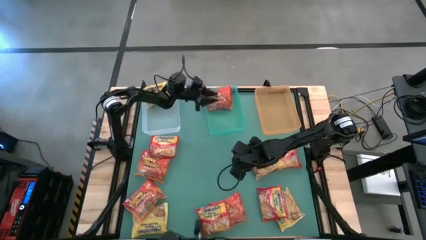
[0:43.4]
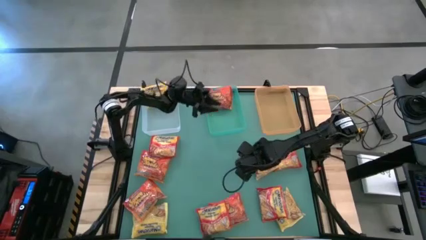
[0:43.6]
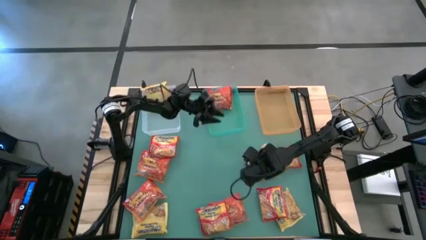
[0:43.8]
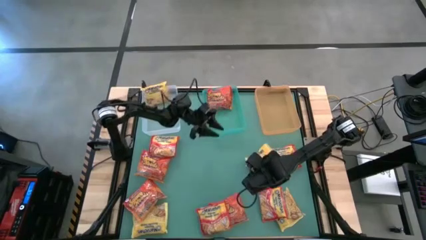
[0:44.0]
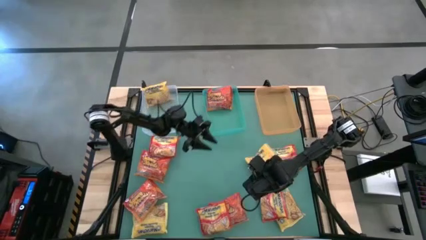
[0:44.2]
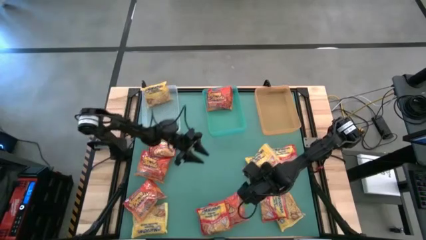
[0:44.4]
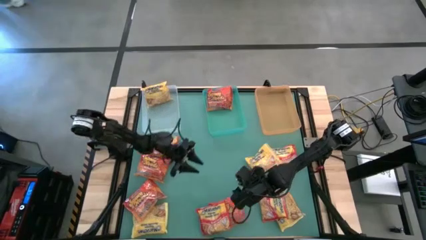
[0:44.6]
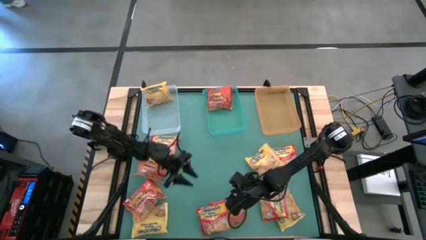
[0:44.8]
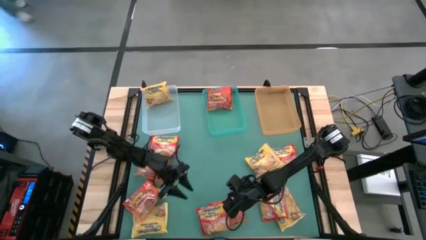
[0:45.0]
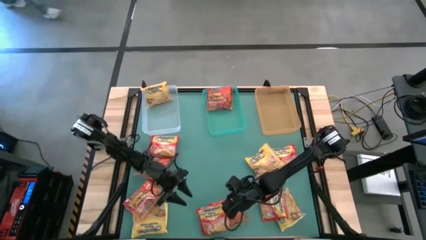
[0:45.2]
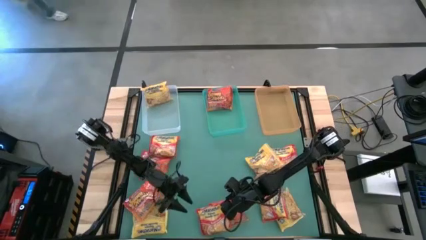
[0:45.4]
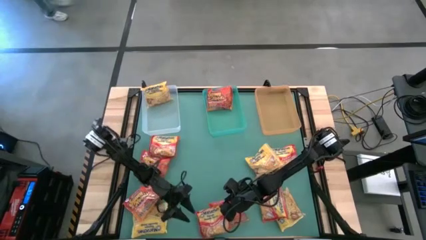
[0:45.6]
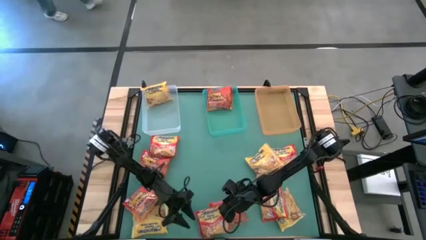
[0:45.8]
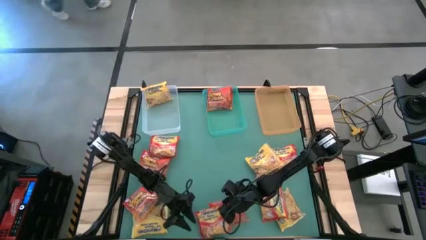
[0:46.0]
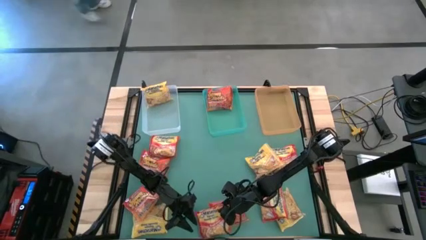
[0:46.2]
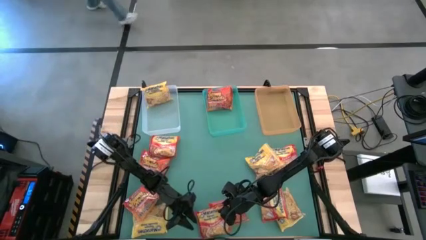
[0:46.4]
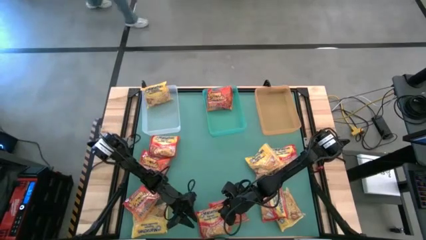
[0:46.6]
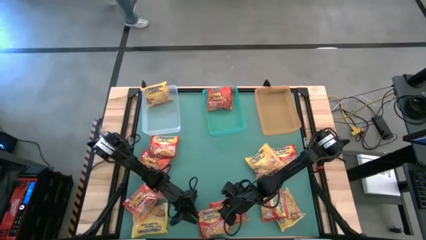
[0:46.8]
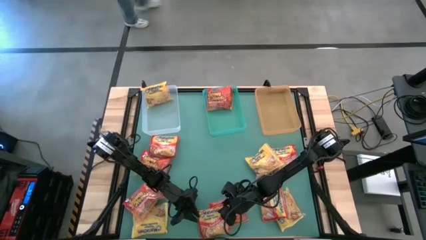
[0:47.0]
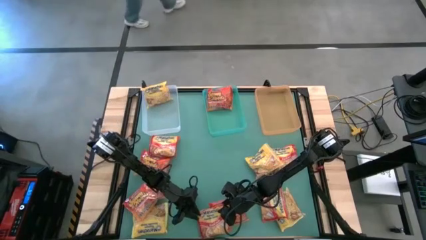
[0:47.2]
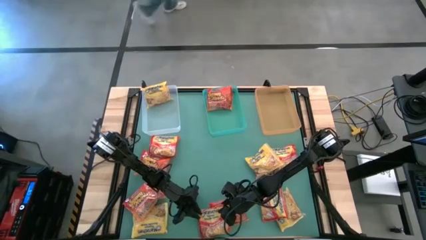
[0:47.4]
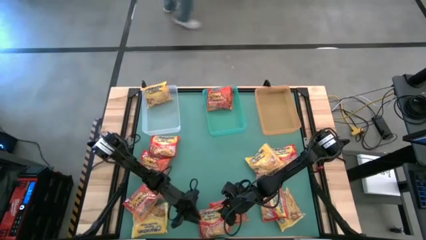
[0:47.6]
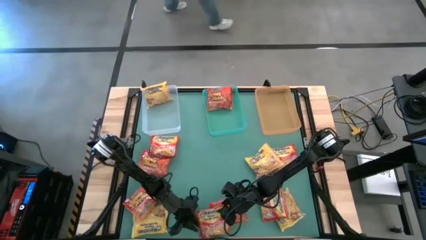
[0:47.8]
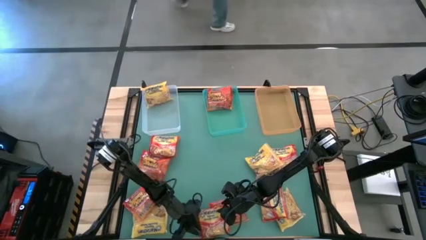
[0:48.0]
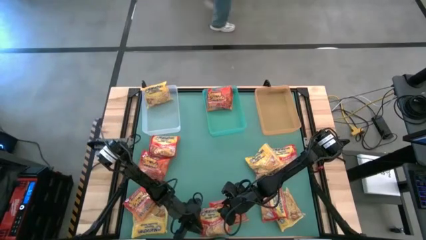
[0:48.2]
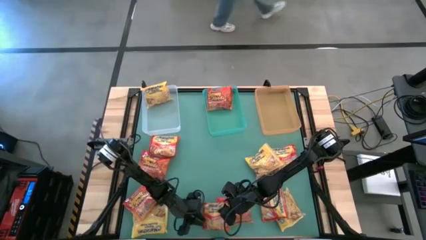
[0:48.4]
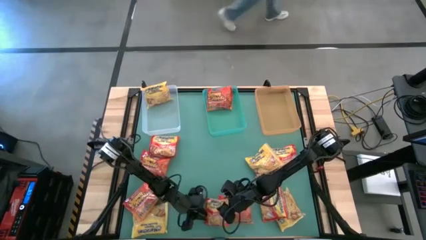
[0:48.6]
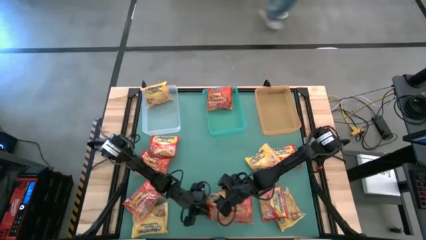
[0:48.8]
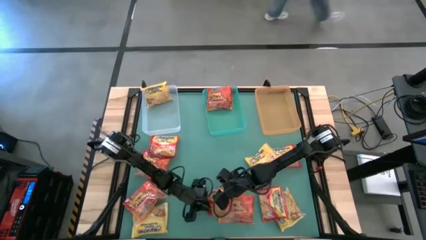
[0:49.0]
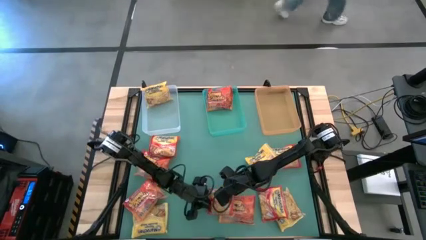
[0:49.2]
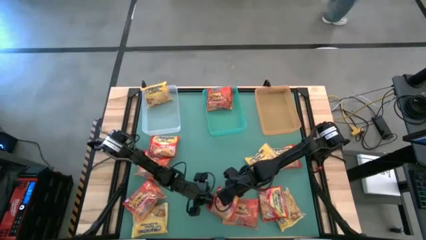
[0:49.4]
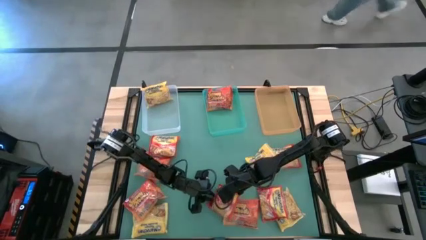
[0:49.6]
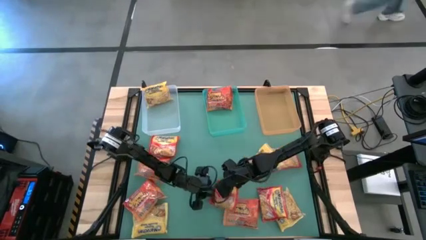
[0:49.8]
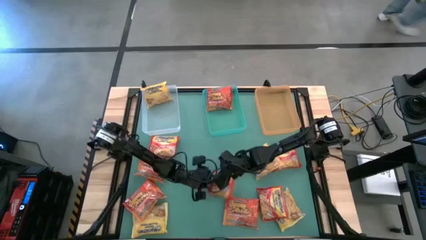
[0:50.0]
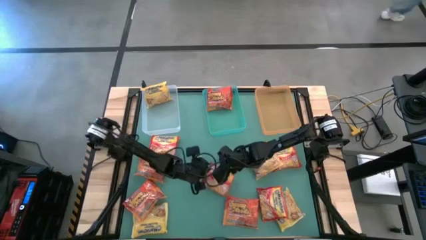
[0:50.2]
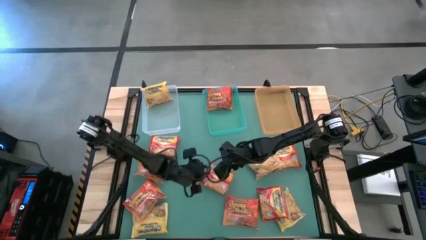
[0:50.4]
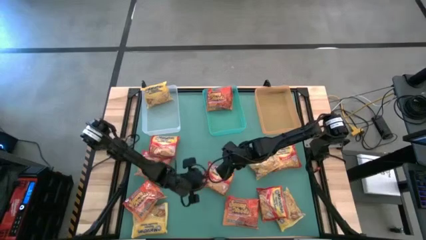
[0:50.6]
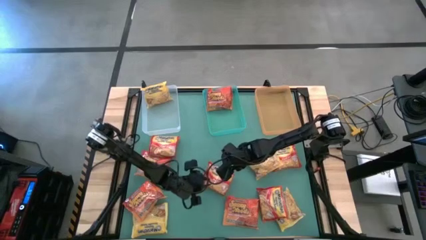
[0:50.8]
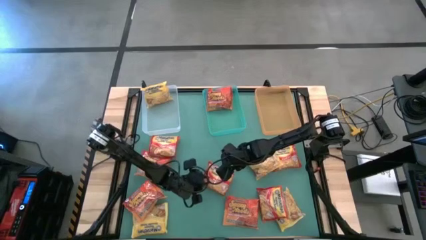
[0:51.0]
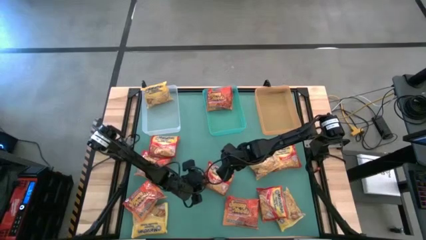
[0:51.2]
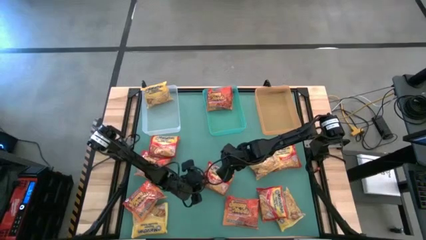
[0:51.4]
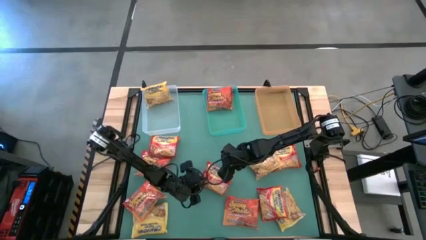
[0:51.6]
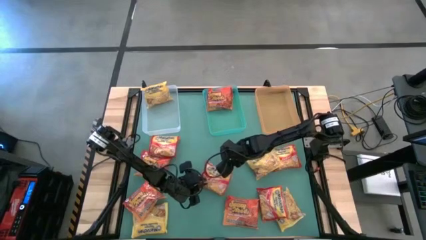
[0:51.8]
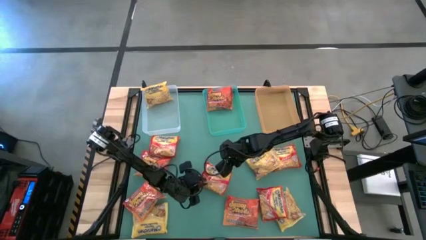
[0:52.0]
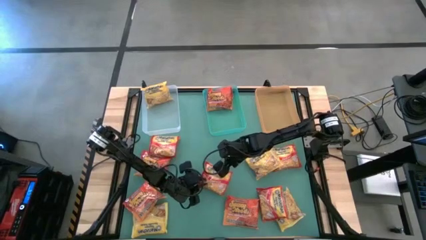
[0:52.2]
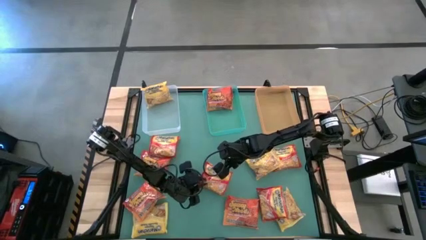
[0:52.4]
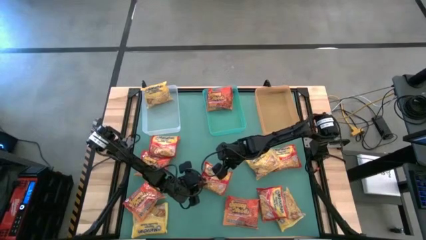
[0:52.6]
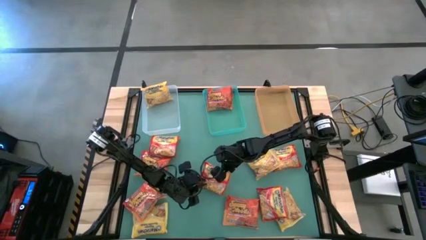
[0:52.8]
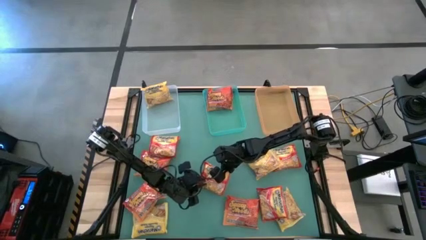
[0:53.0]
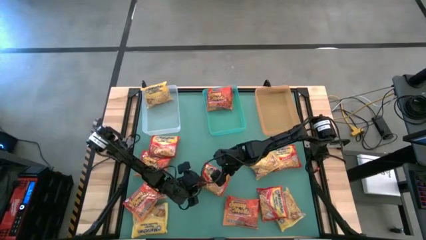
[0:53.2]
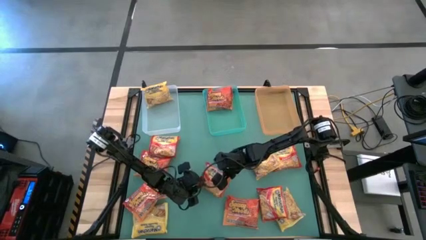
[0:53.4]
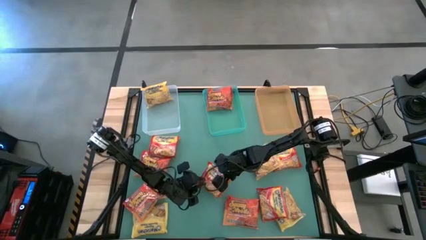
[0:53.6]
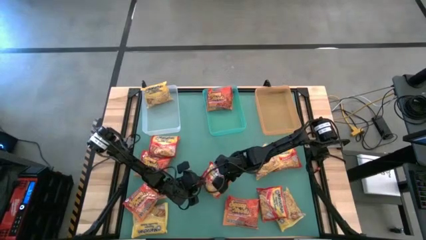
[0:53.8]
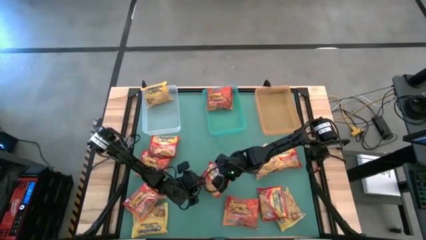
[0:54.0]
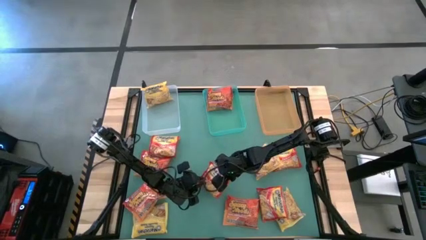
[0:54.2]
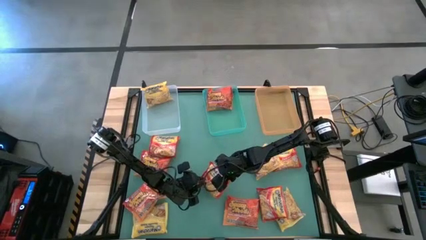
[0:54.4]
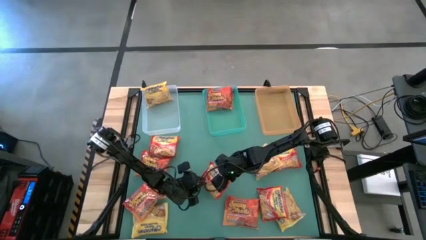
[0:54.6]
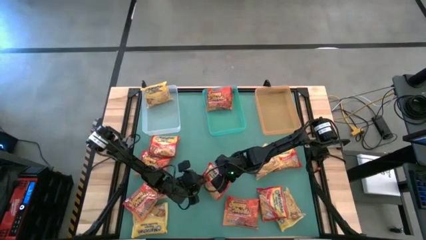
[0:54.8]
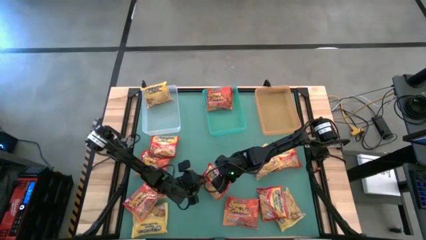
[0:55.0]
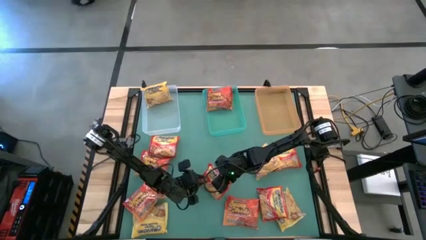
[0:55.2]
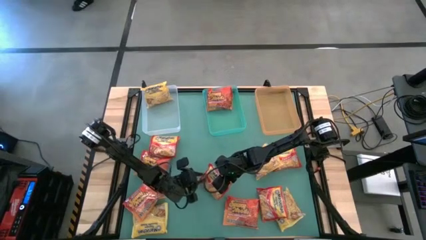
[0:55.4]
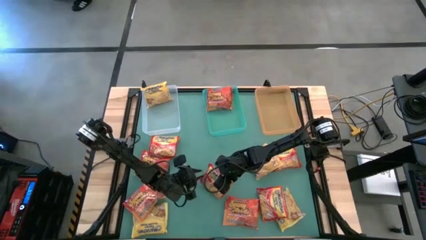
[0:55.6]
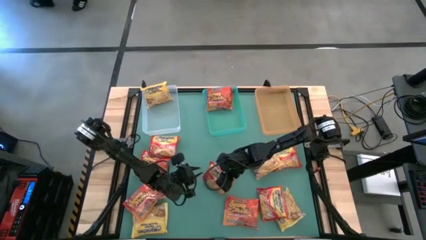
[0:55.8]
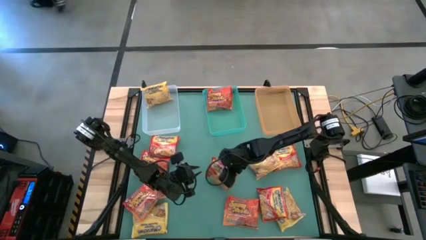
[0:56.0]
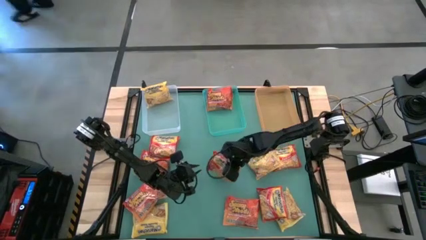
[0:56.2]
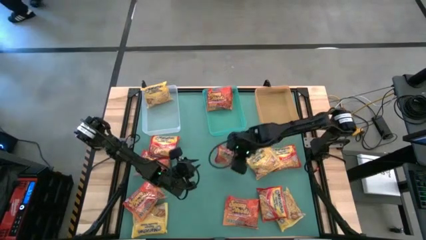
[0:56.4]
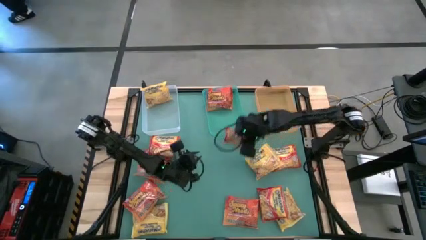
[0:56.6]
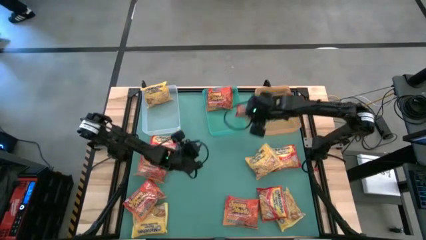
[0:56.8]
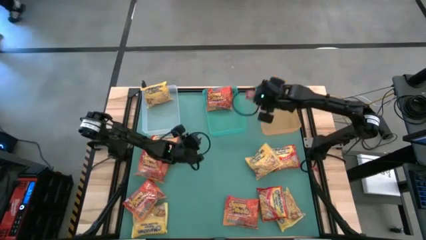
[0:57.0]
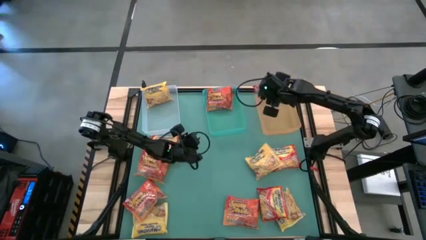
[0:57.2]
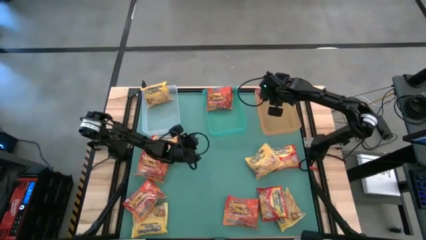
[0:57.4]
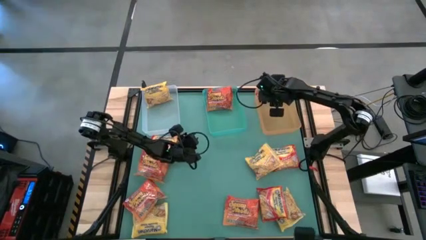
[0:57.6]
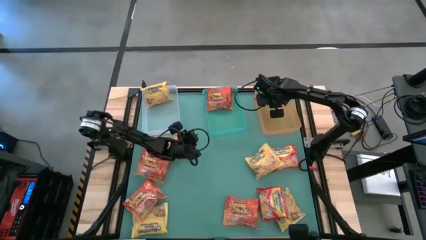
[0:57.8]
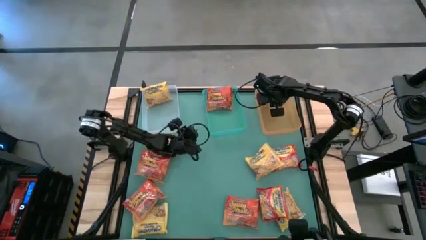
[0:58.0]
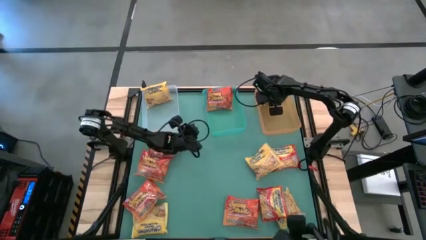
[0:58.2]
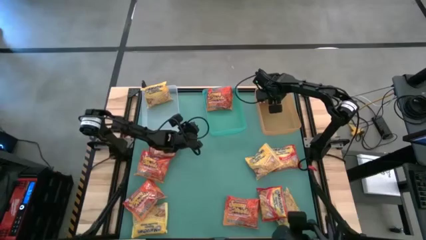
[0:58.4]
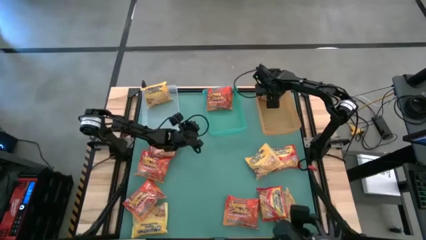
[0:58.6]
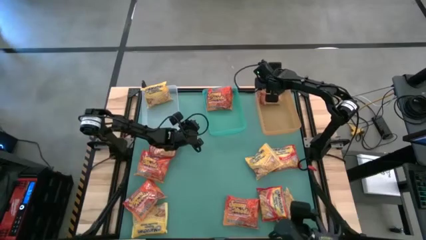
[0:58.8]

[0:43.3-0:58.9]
Task: Sort Maruchan noodles
Put the orange noodle pack into the orange bin

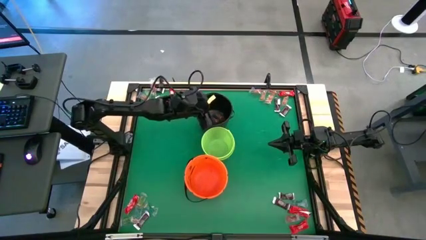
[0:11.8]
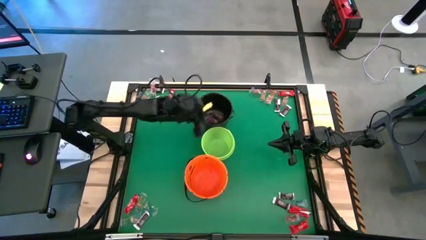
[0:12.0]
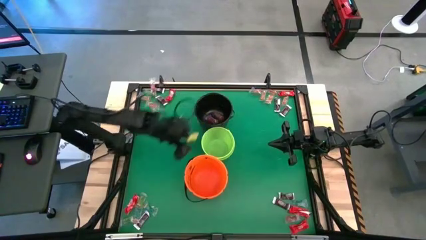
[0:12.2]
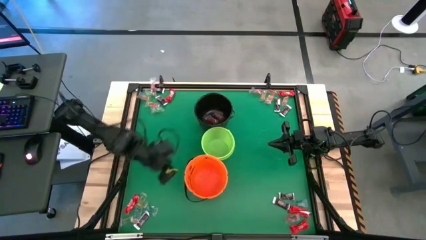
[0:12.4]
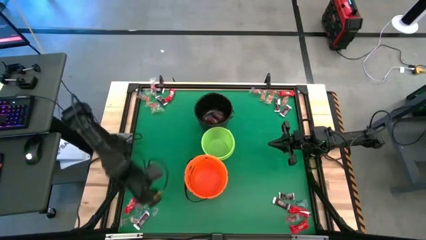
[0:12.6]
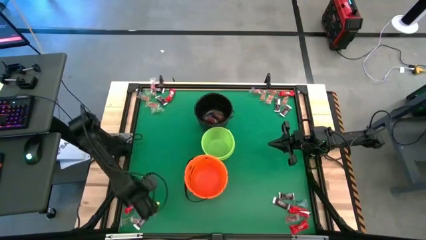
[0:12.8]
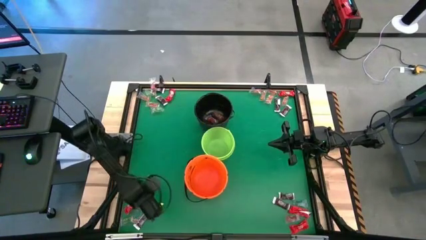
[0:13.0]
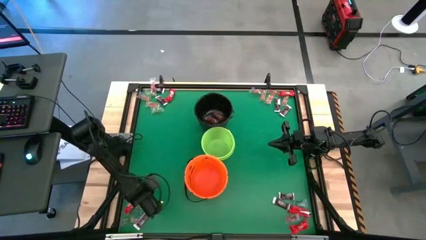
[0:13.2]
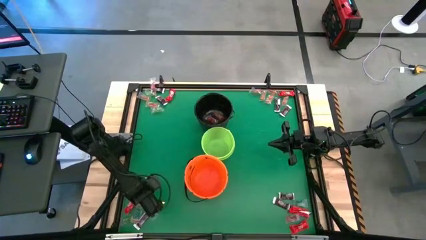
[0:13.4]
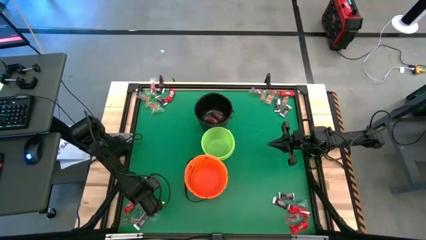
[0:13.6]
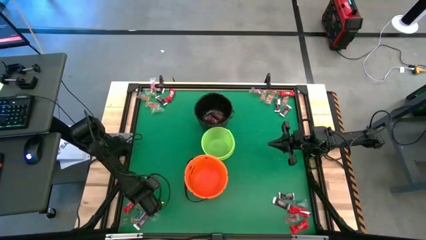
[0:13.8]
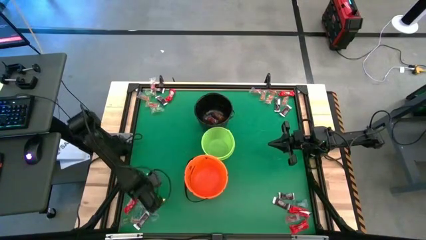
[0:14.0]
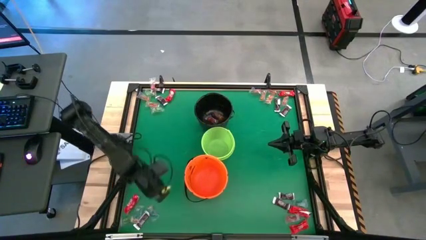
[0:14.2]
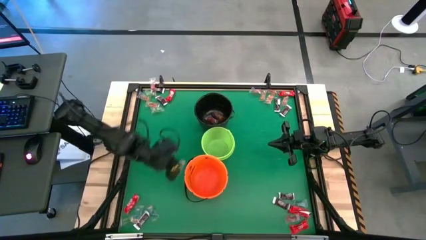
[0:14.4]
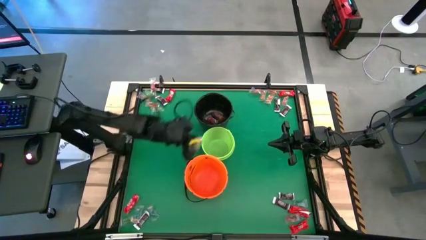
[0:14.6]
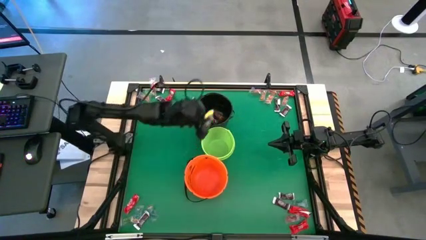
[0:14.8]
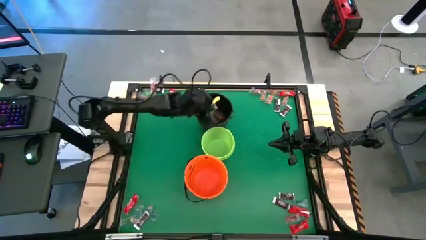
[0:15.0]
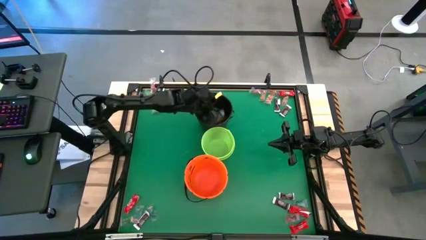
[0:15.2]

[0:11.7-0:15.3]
Task: Sort candy by brand, put in halloween buckets
Put the green gummy into the black bucket
